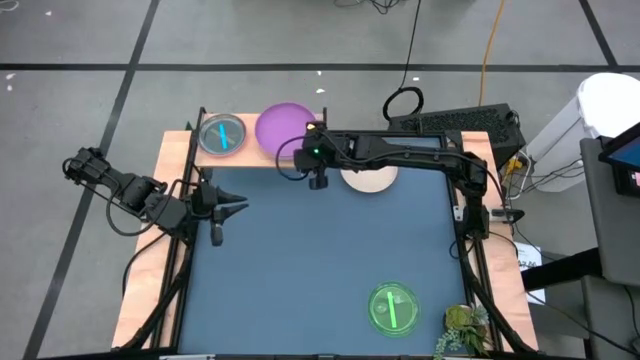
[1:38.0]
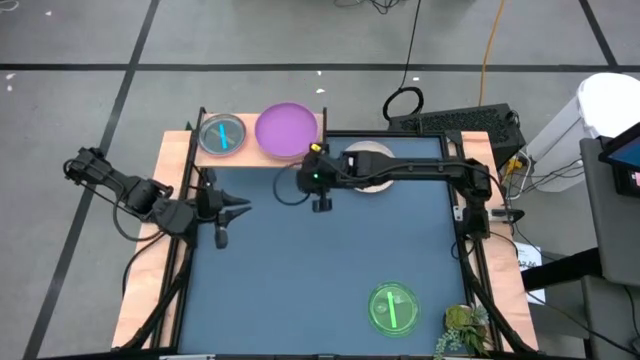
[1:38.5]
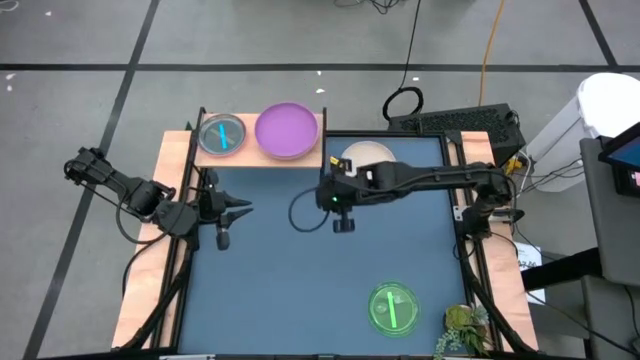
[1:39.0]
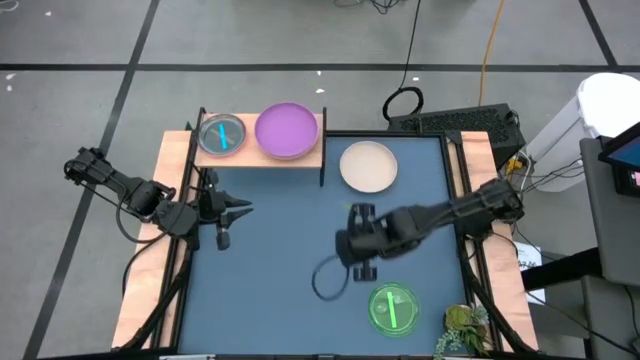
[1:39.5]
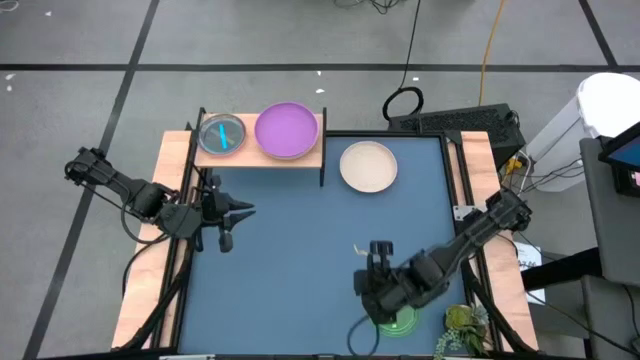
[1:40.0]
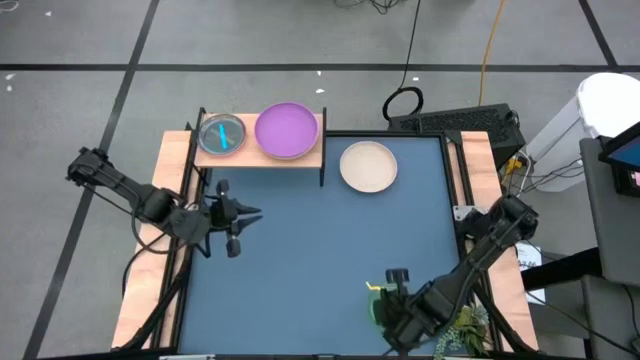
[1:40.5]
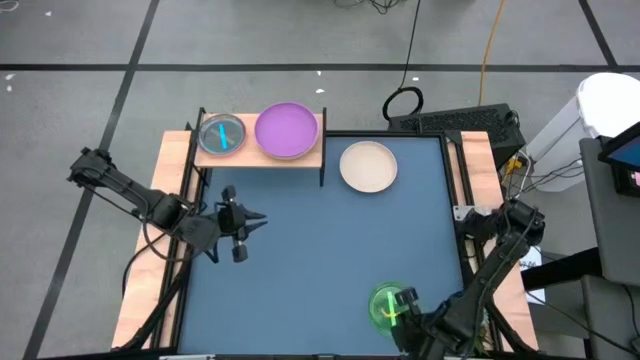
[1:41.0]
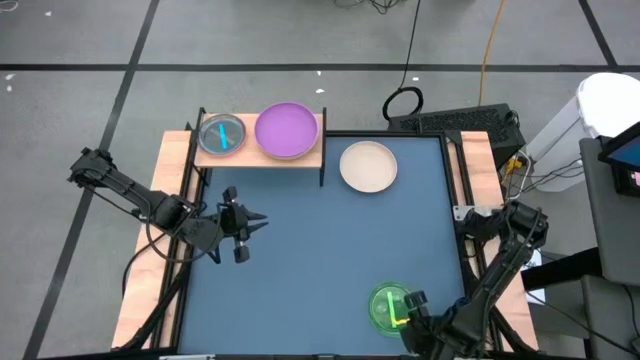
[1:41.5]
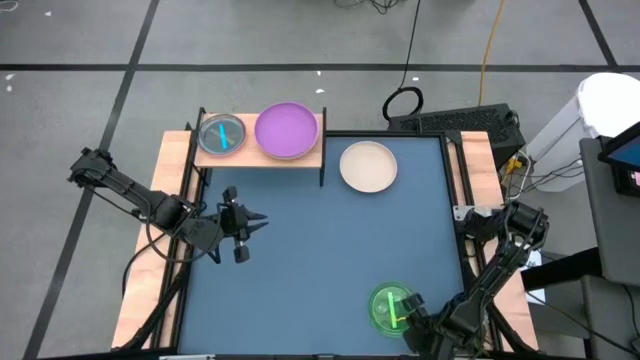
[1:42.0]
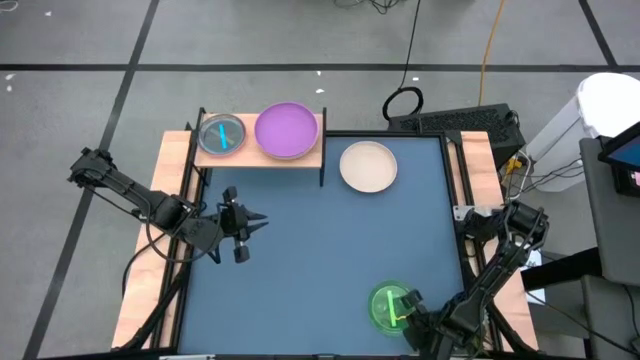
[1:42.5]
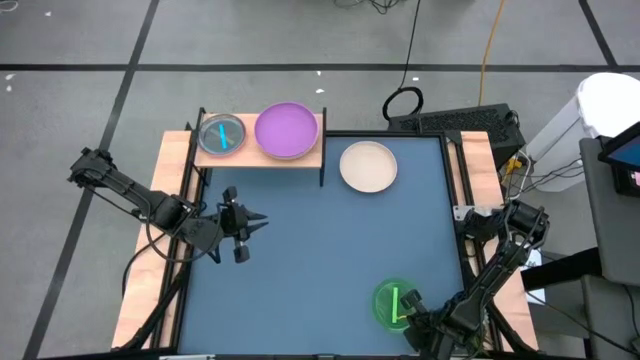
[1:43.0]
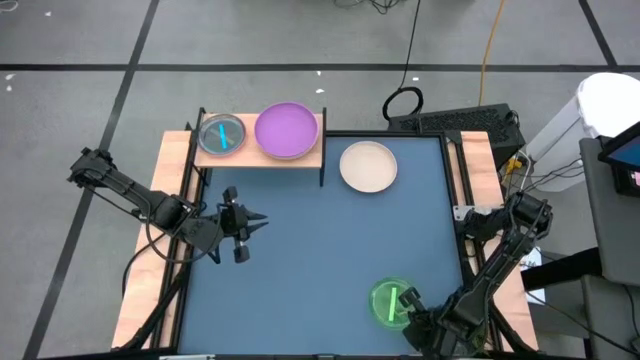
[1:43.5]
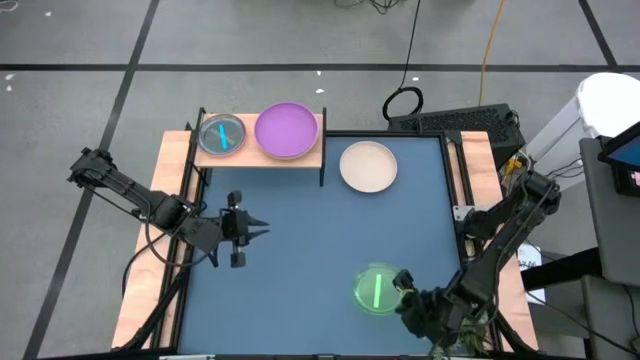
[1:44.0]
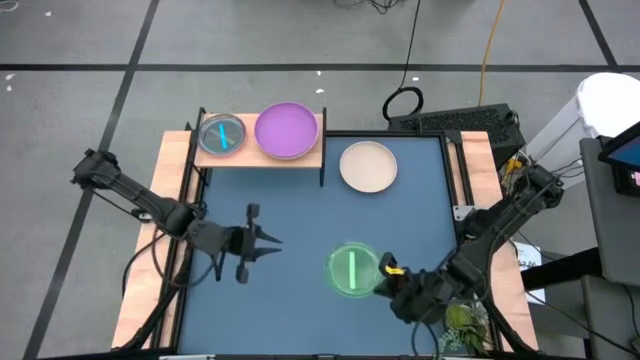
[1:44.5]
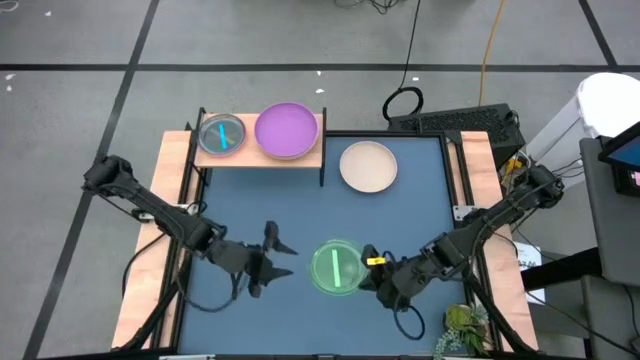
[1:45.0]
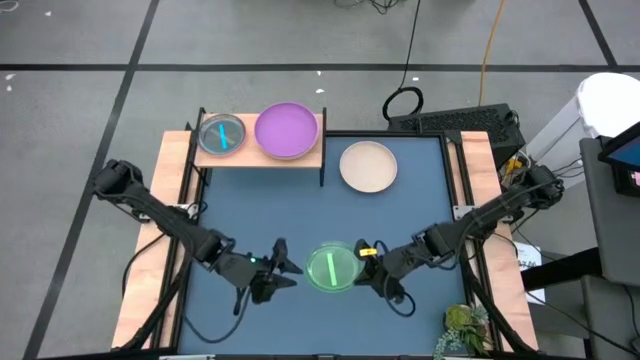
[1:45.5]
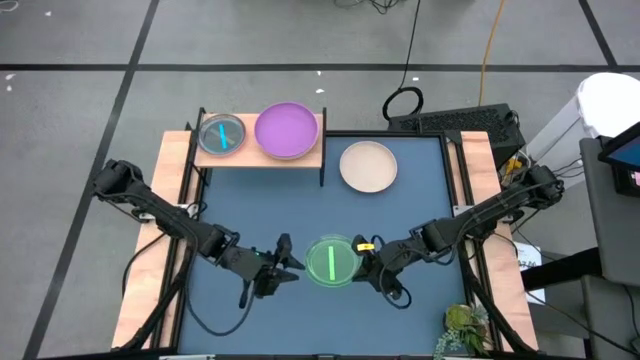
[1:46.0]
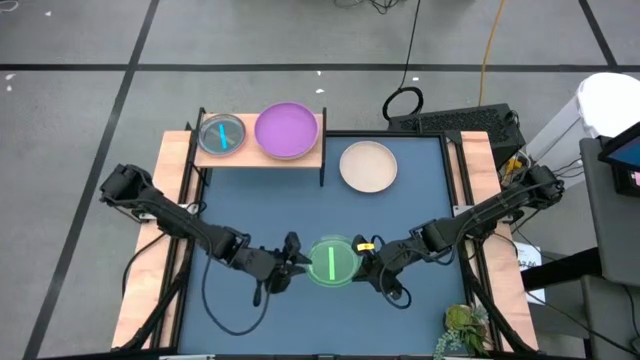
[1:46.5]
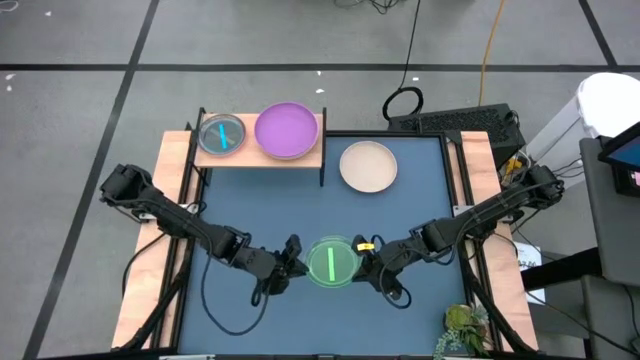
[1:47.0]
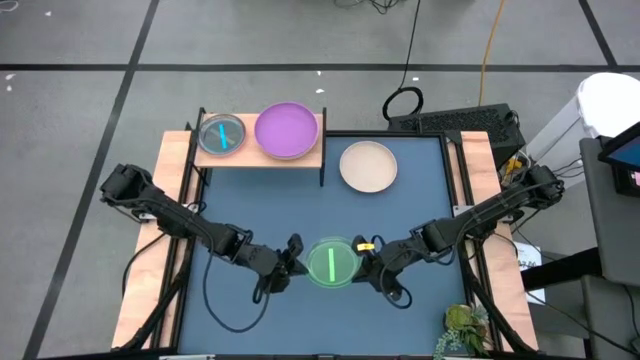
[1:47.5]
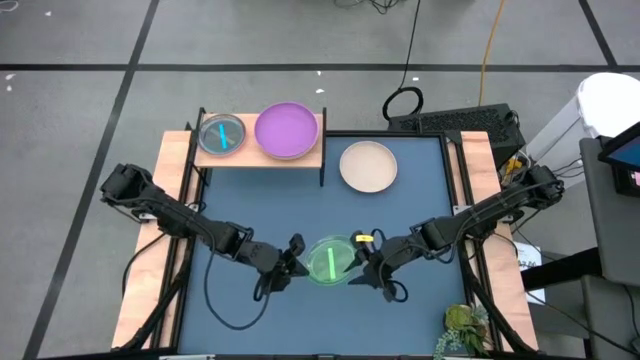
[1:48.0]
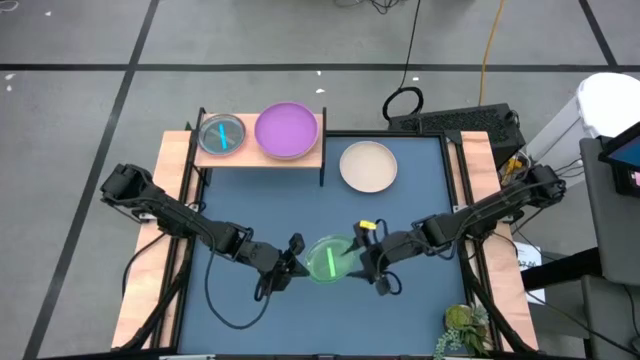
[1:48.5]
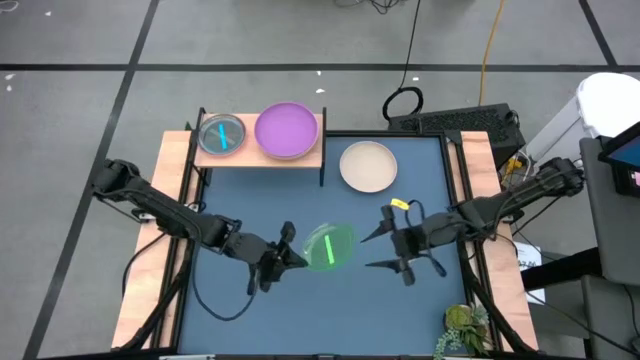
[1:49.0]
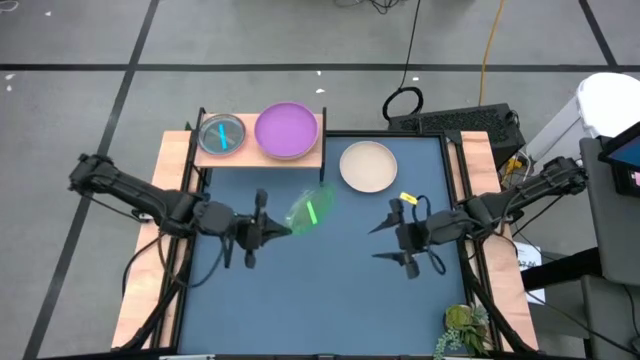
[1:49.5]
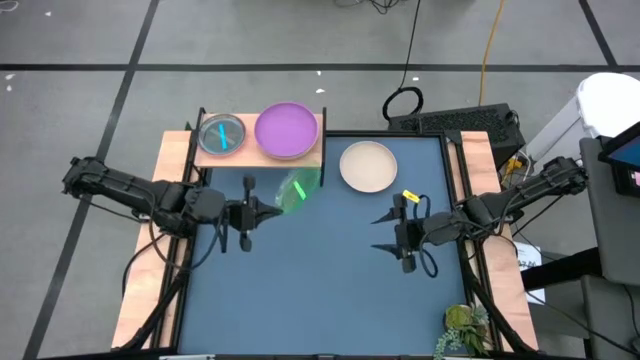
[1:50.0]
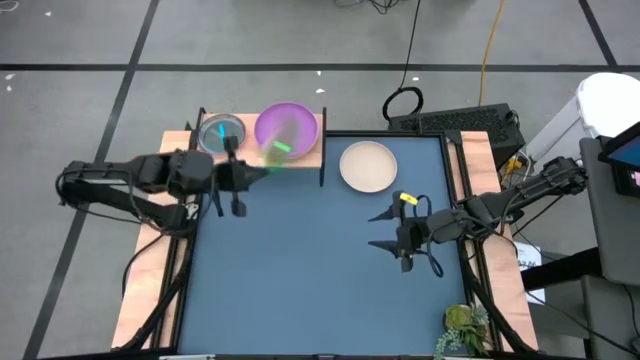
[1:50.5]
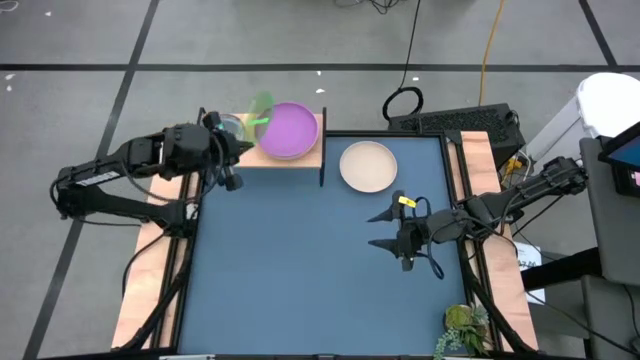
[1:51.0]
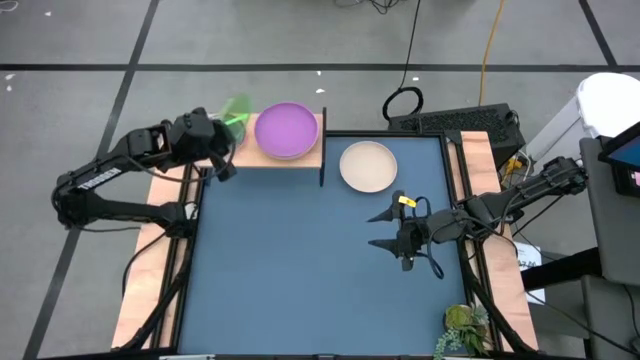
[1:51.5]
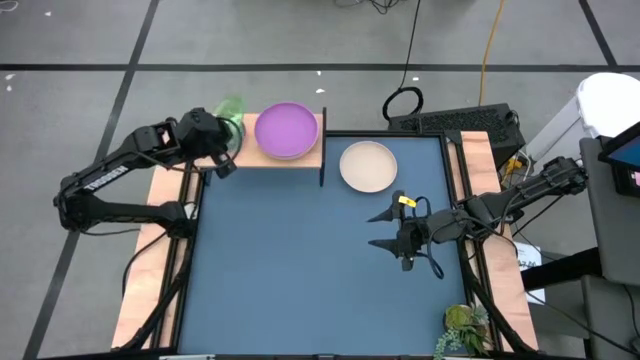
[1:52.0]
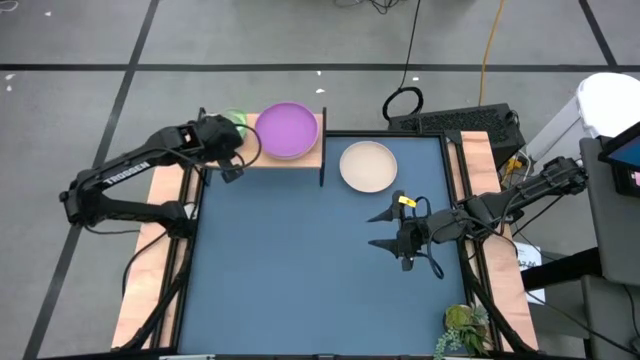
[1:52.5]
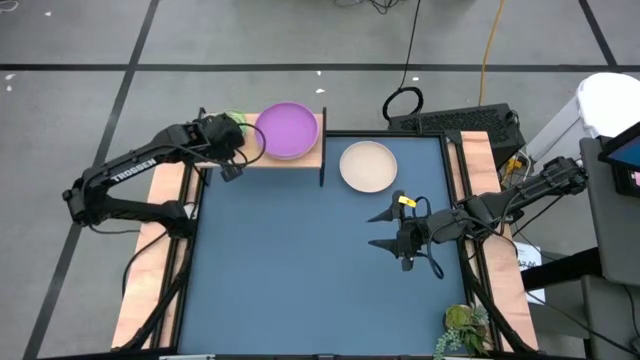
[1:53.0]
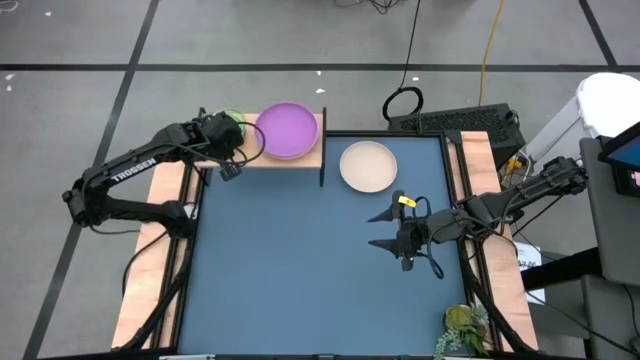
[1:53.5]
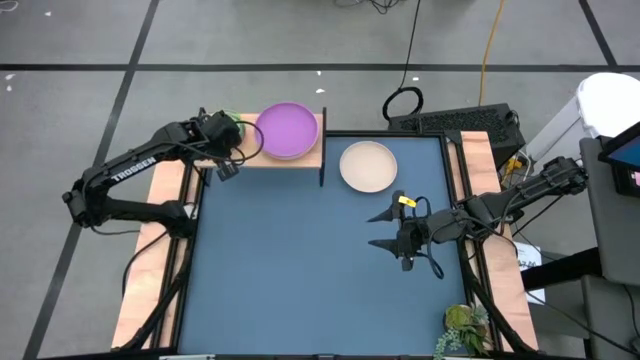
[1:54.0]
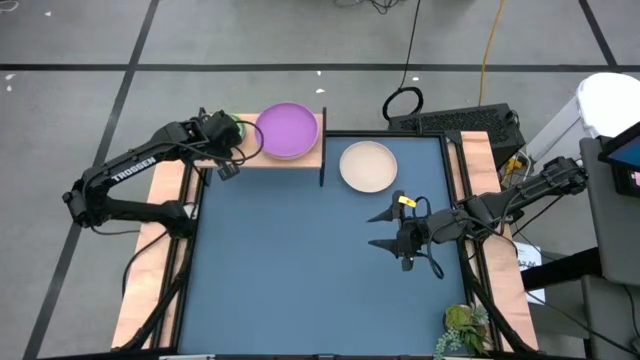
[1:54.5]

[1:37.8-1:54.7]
Task: Place and stack plates onto a shelf
Stack the green plate on top the blue plate on the shelf

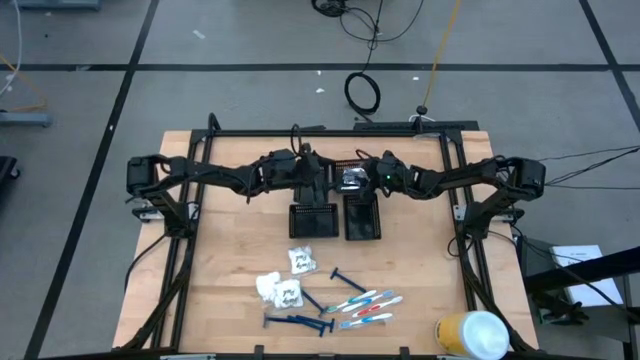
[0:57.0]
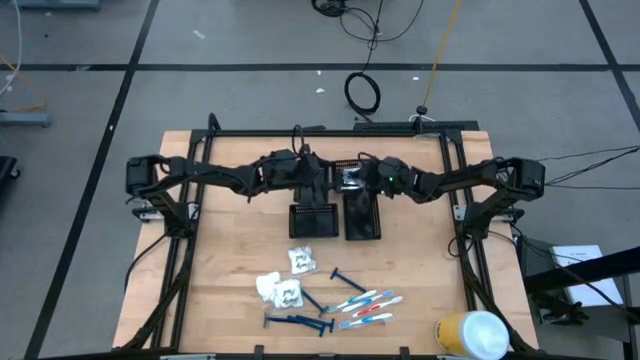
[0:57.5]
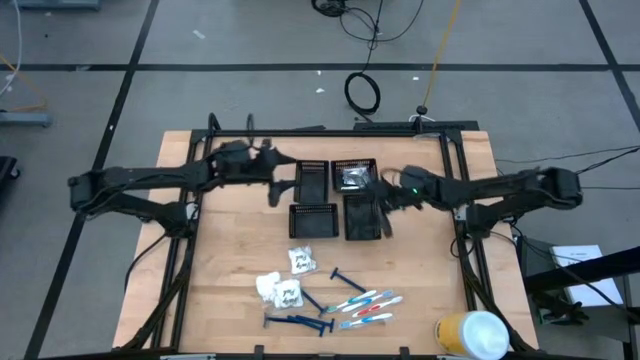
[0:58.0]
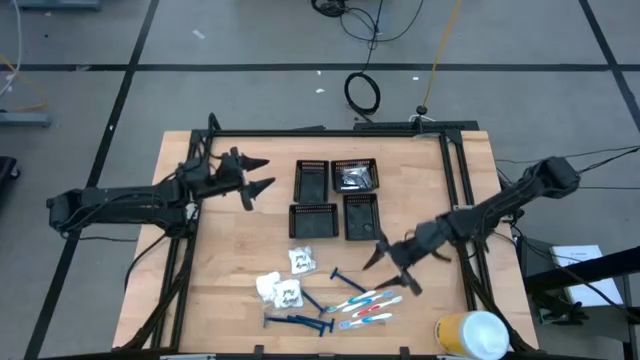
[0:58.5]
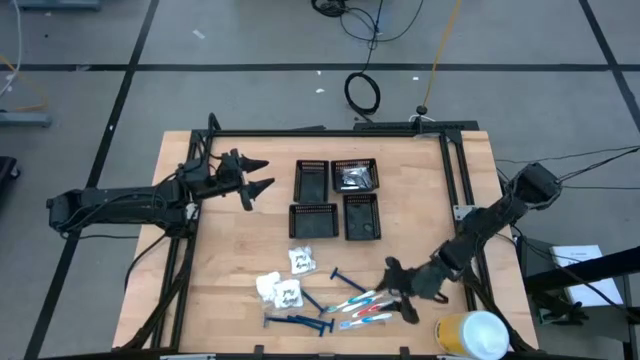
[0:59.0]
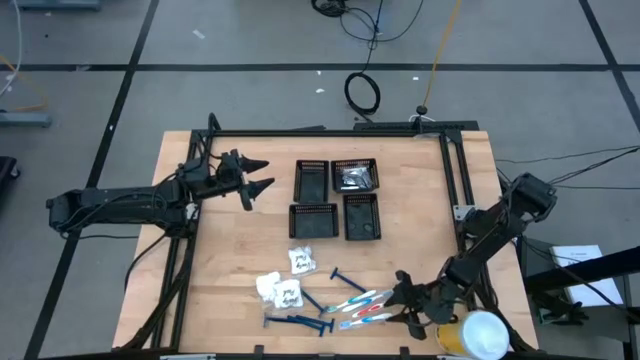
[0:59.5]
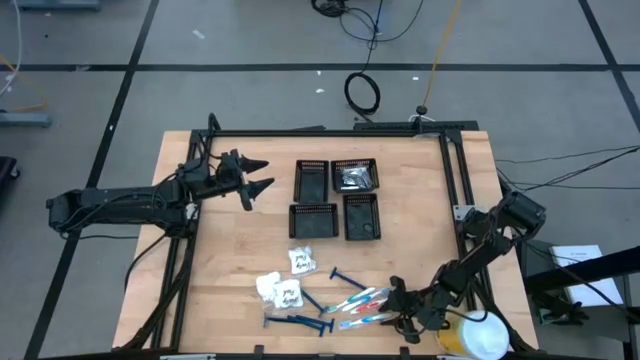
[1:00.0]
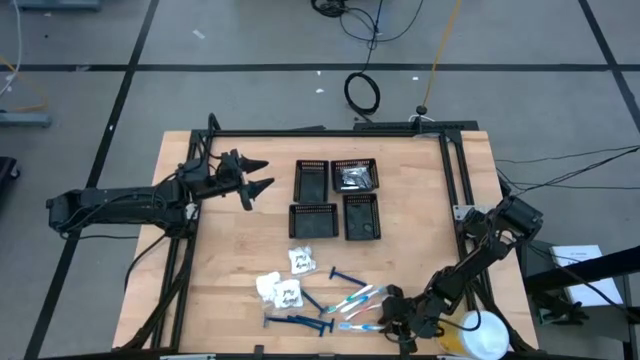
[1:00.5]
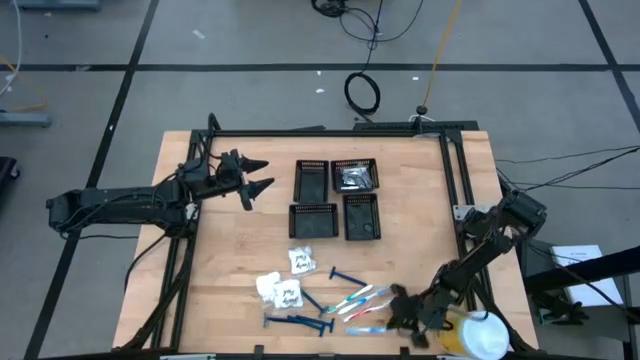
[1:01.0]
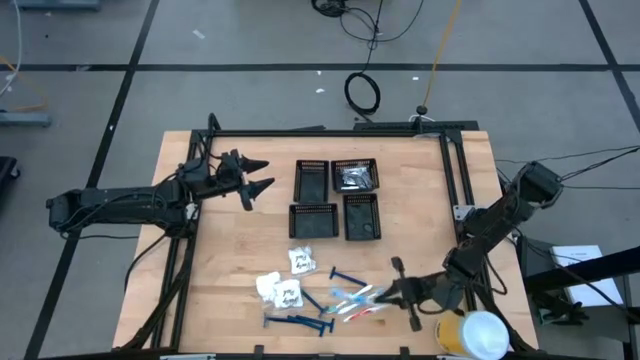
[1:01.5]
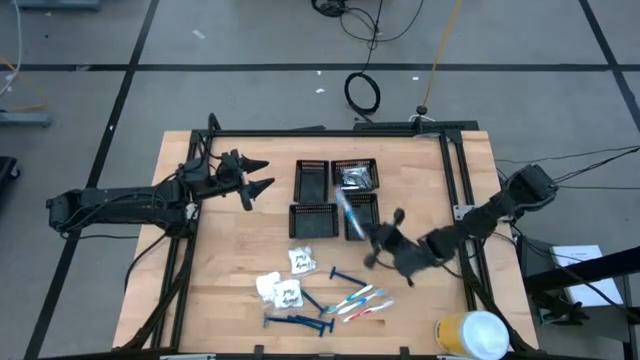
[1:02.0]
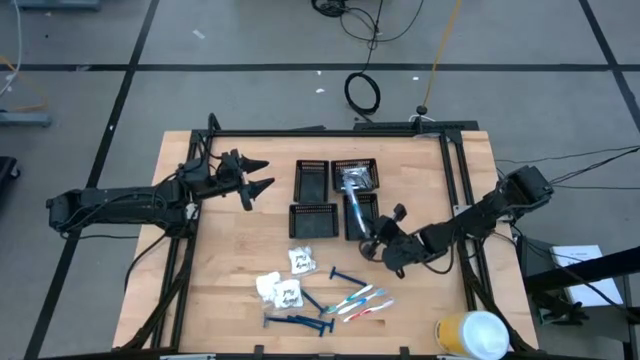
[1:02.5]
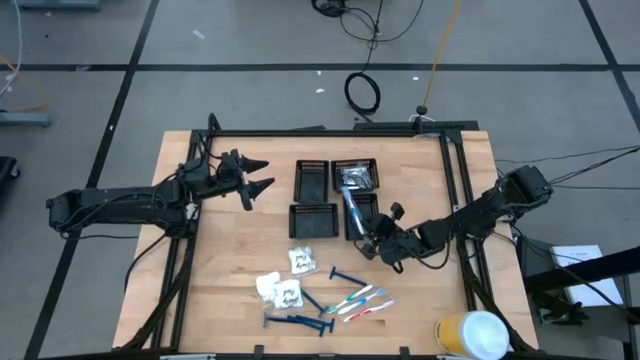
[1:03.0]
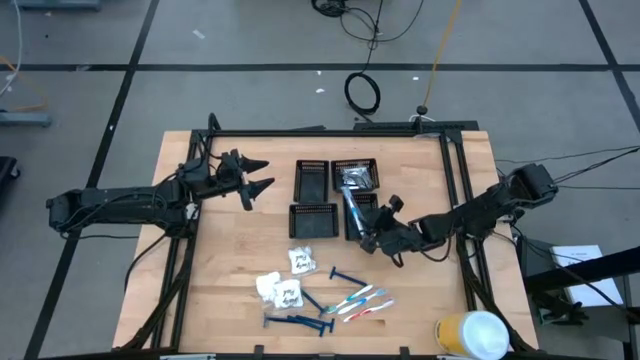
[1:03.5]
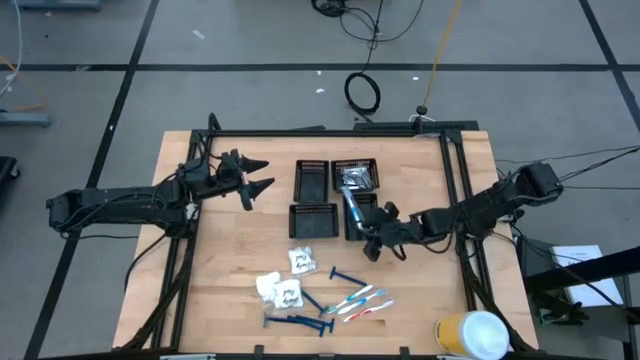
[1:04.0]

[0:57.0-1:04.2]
Task: Pick & Place Travel size toiletries
Put the blue toothbrush into the bottom right black bin
